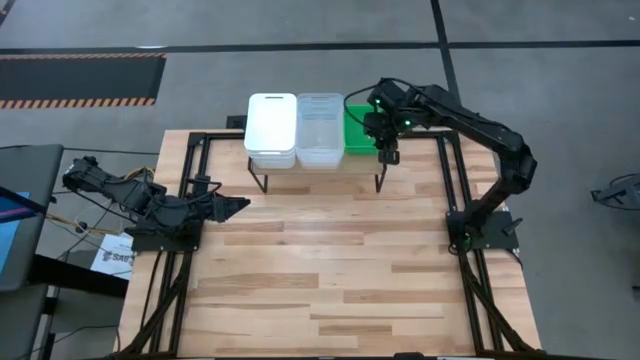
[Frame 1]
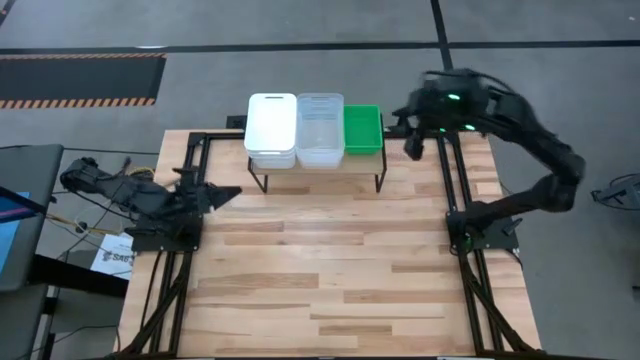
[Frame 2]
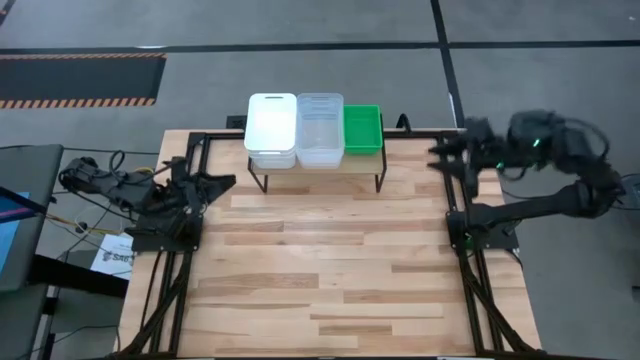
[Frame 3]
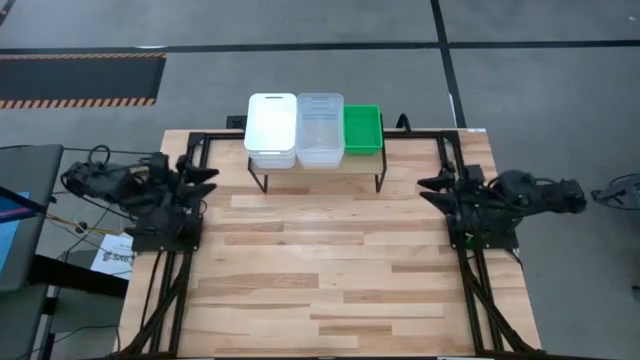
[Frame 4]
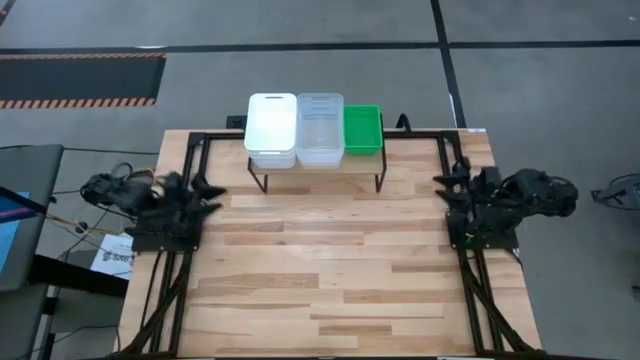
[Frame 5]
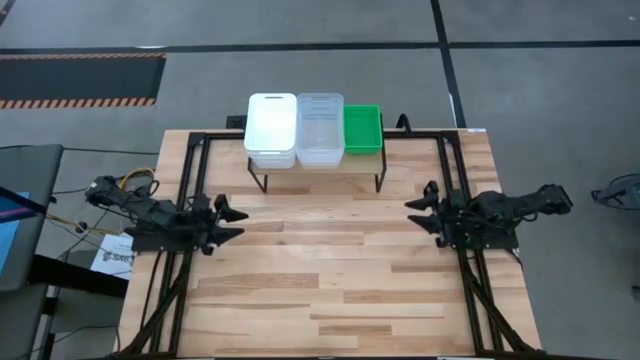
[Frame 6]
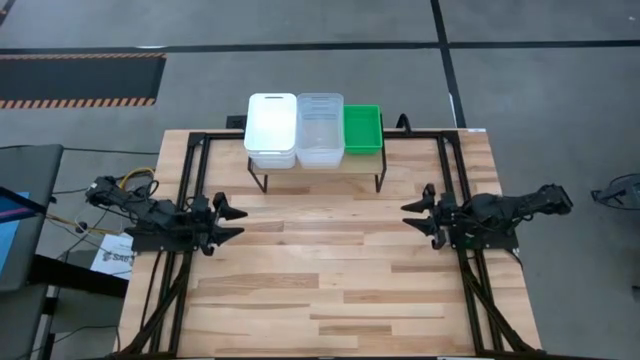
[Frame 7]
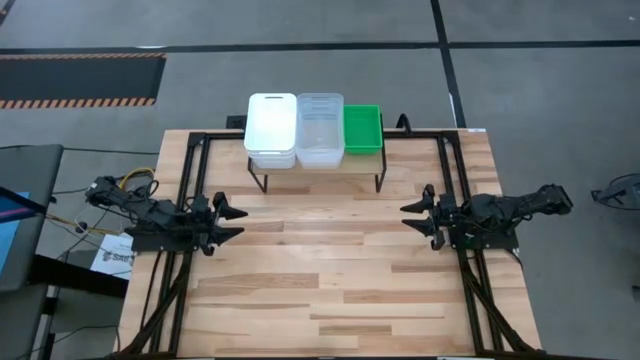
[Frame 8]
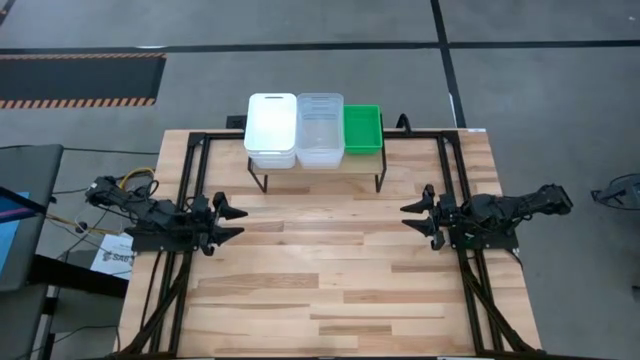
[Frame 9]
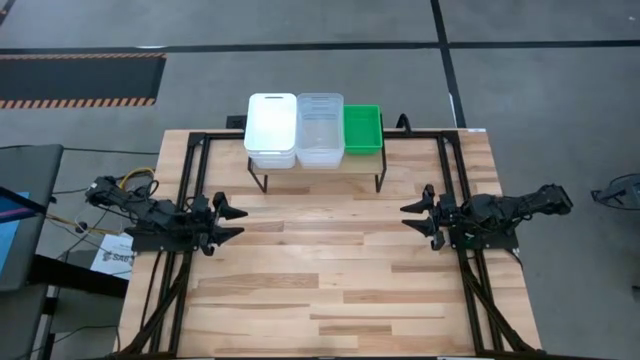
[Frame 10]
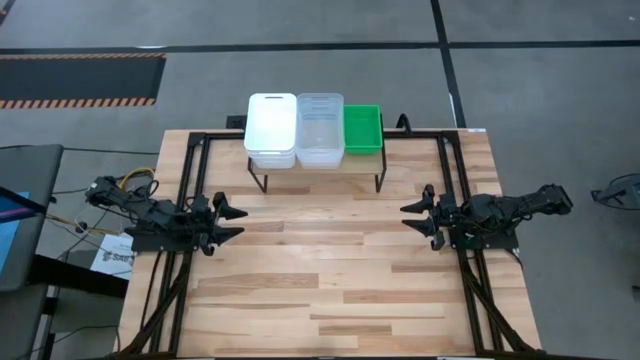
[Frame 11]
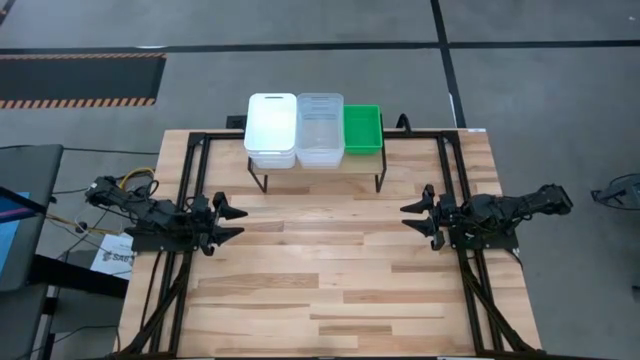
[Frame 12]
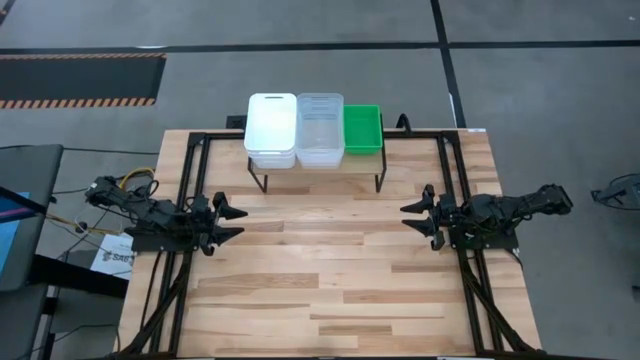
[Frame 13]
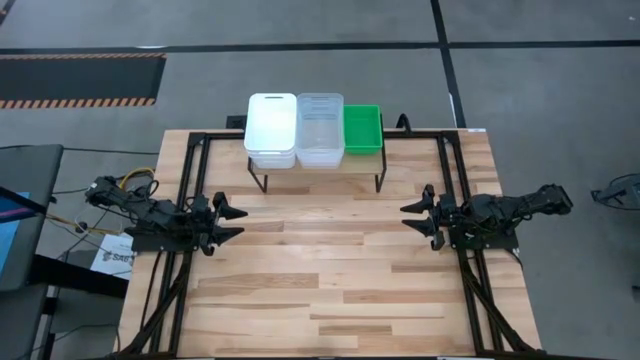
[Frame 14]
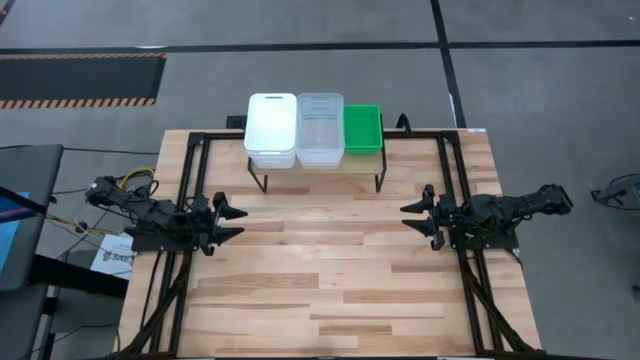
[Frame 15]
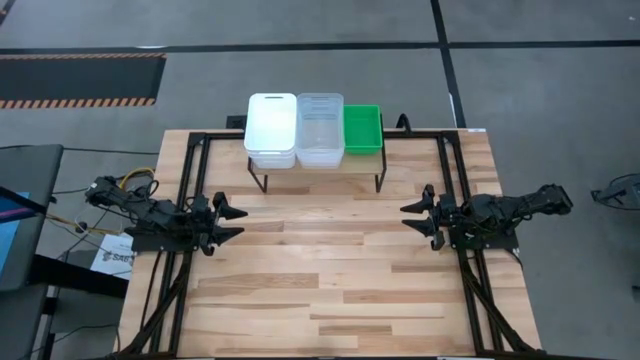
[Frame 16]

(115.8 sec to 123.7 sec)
Task: Stack baskets on shelf by color
Return to Home Position

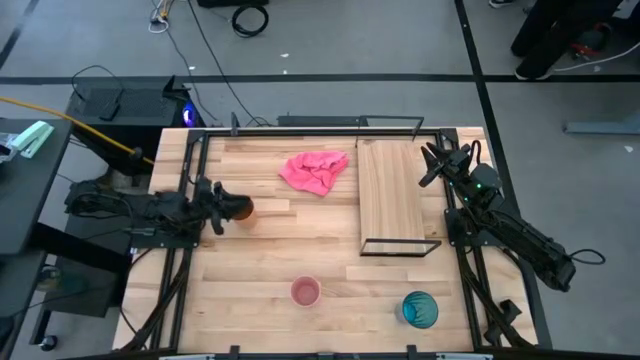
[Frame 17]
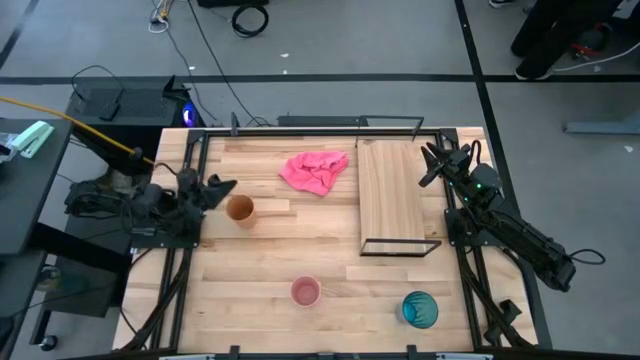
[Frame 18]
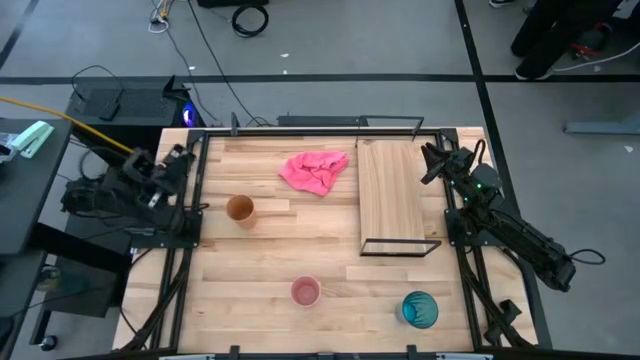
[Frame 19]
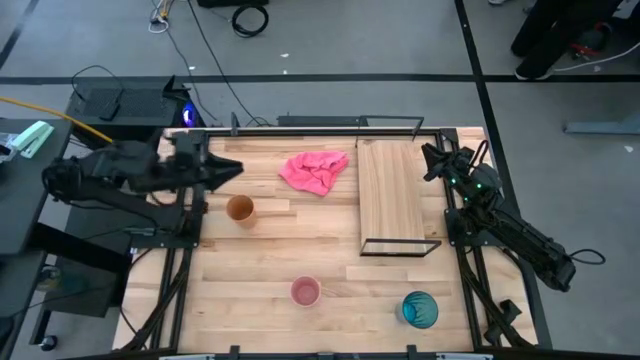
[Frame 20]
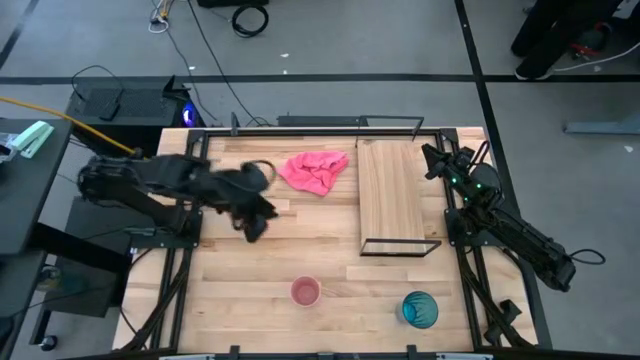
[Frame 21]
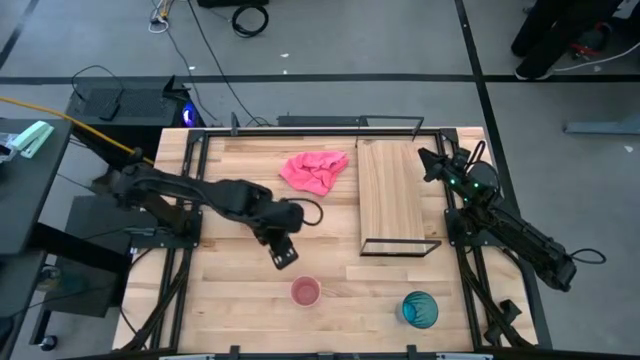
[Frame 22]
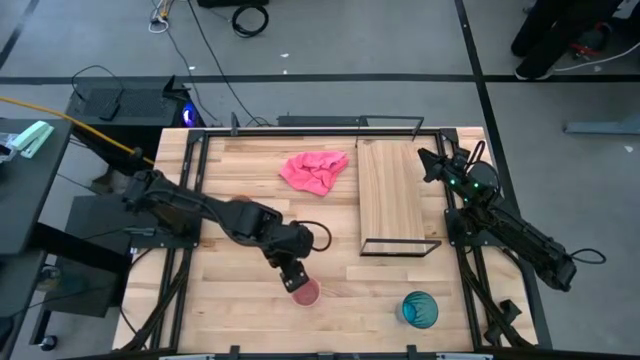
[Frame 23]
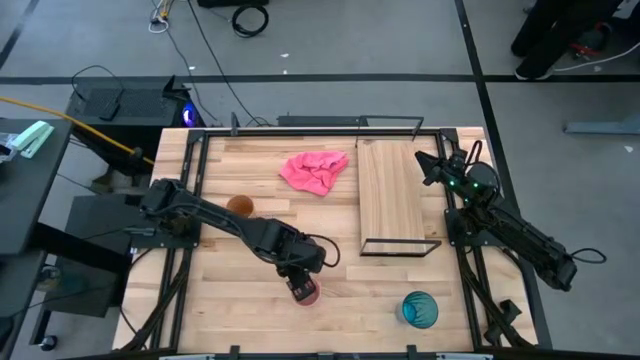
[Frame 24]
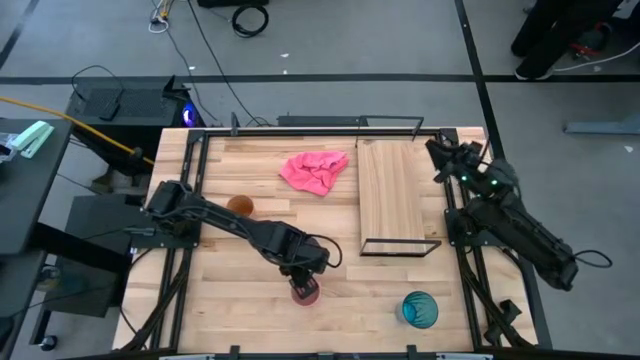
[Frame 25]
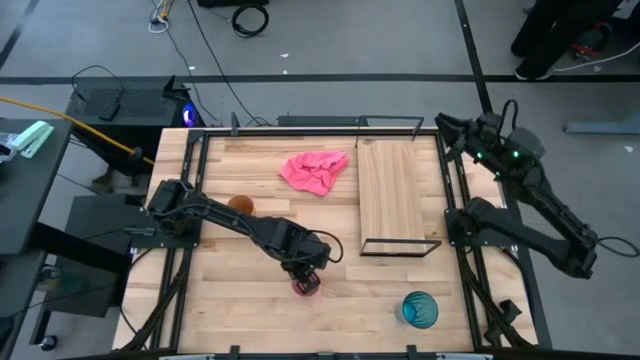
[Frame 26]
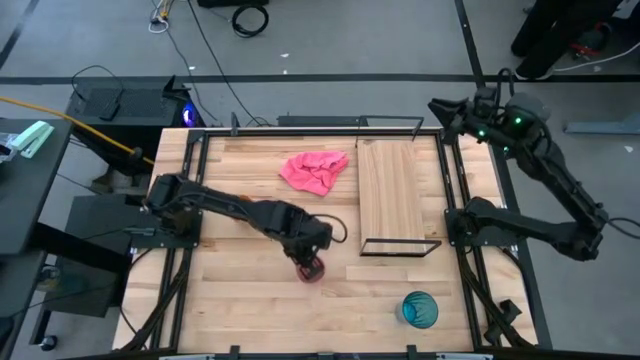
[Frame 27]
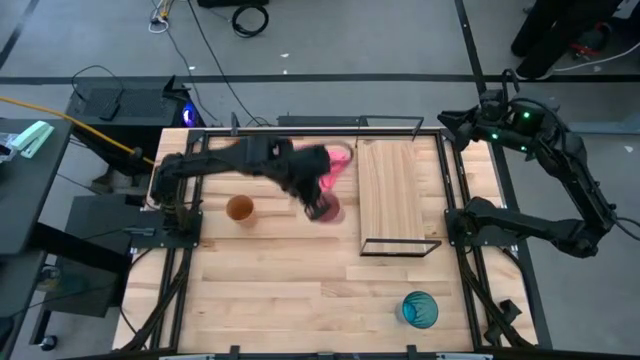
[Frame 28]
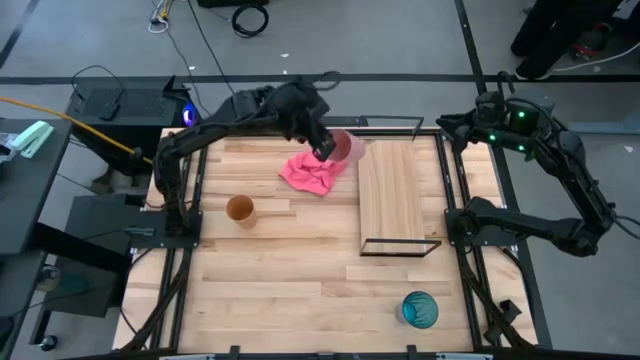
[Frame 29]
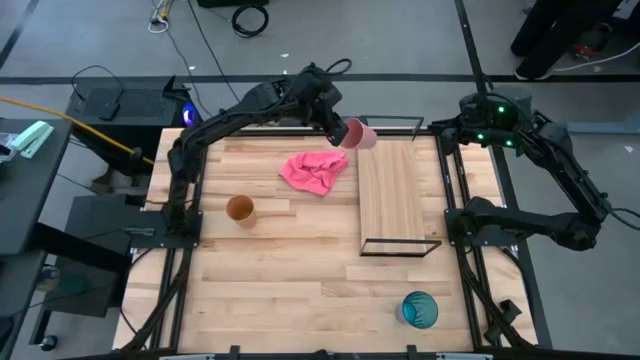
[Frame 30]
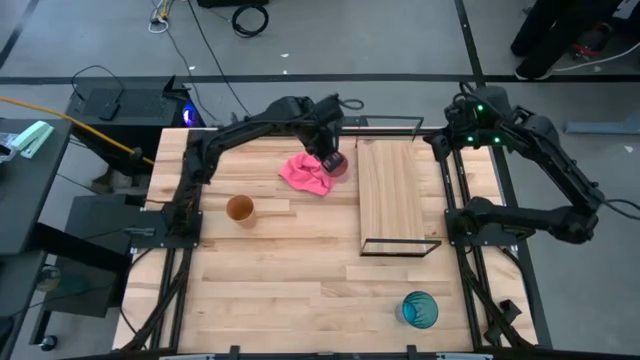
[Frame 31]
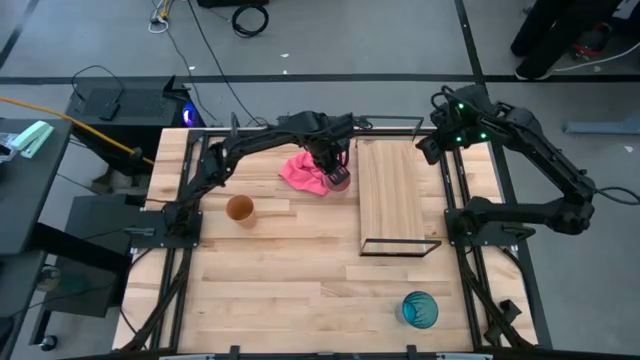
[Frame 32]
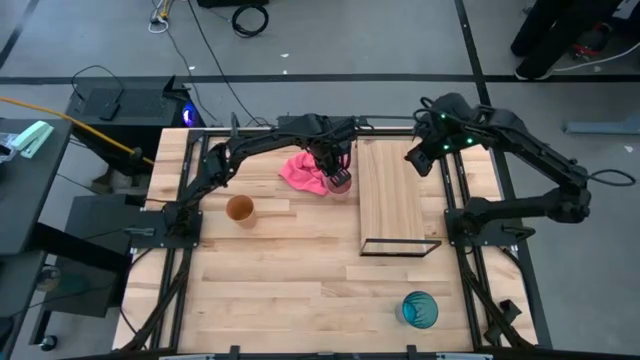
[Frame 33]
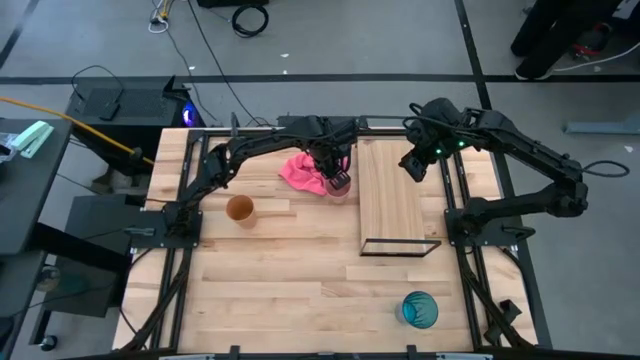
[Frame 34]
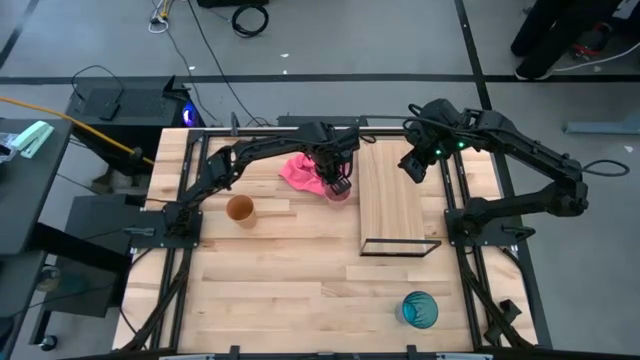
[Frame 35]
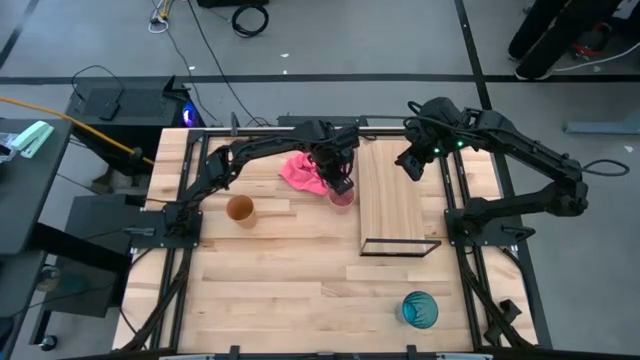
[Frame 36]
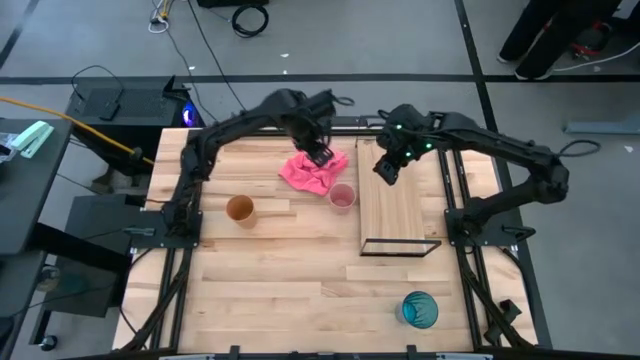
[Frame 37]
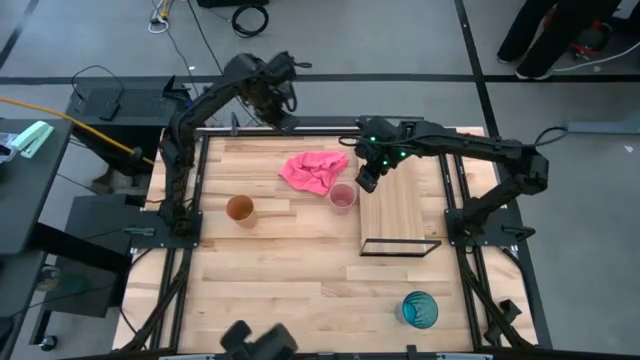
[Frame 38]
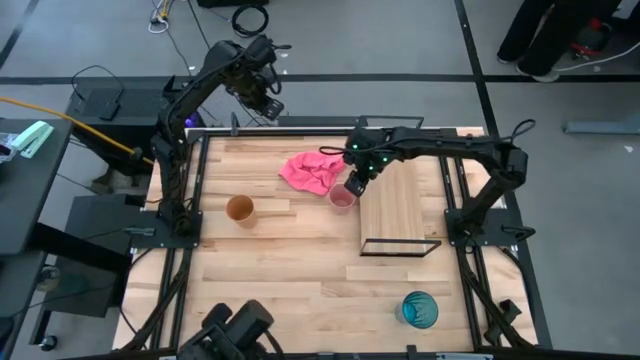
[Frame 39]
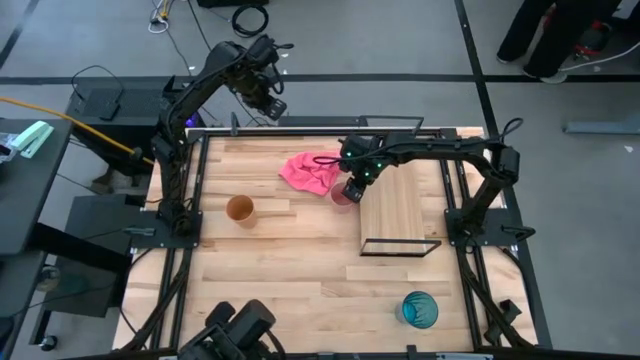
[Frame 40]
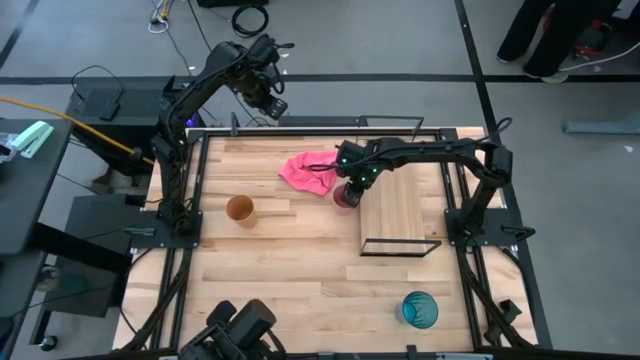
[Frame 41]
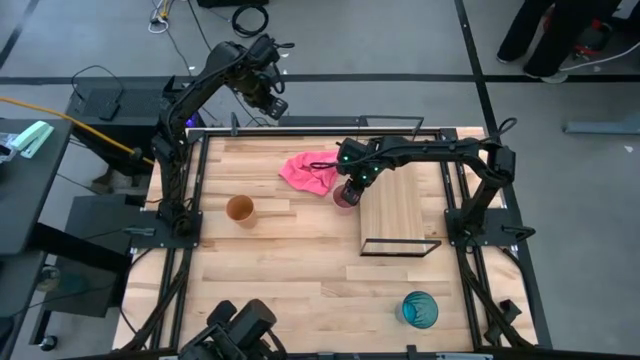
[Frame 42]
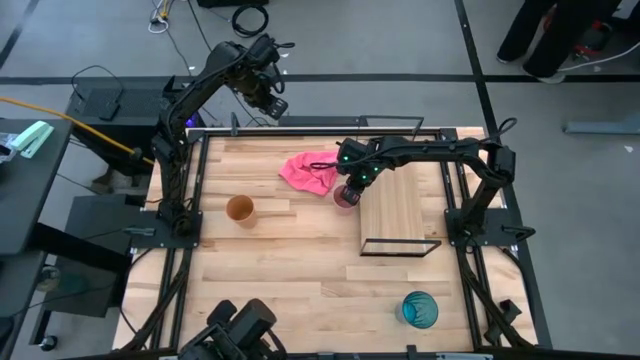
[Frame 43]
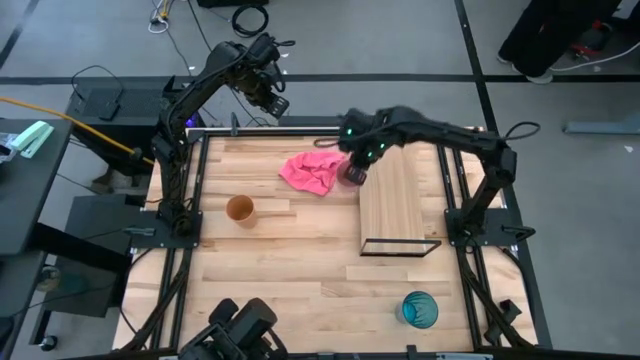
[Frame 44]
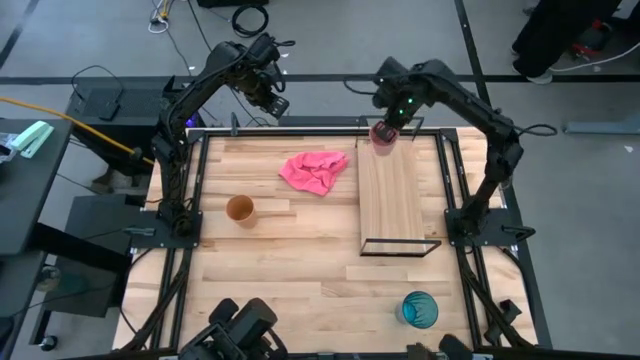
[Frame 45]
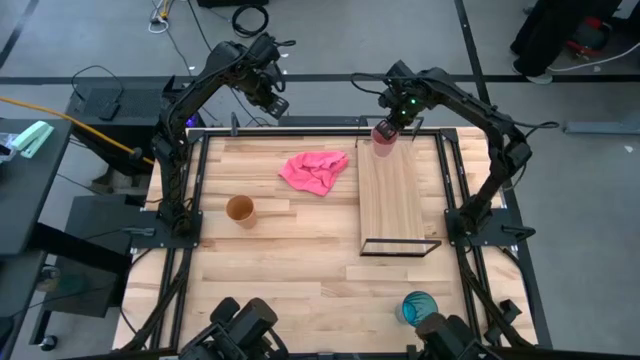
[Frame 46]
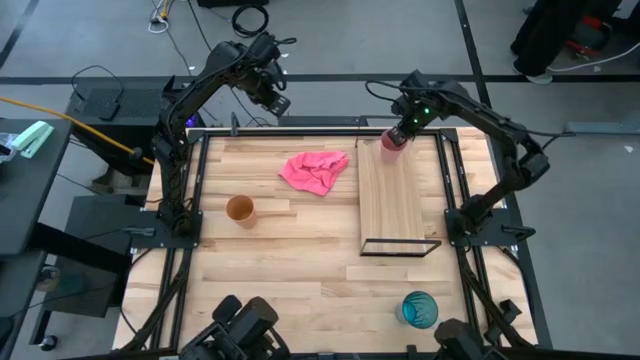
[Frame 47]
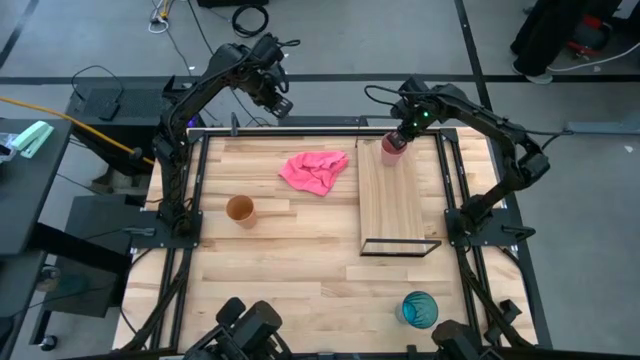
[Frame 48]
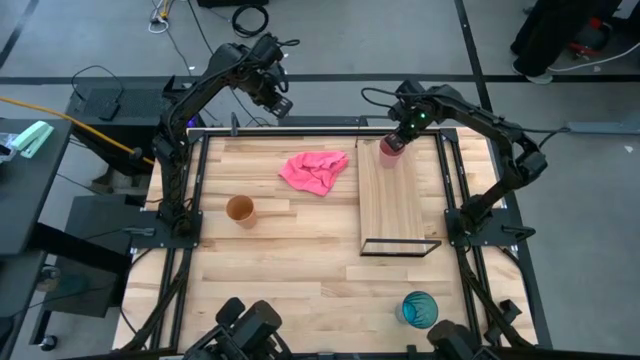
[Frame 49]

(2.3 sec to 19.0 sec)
Task: Stack small to large cups/mugs on shelf
Put the pink cup on the shelf
